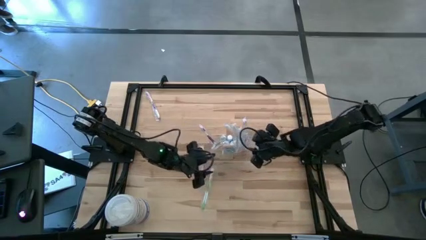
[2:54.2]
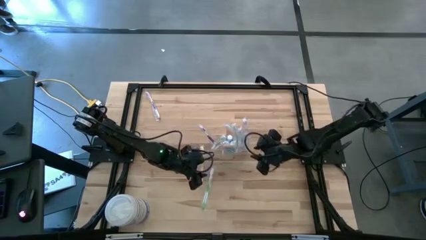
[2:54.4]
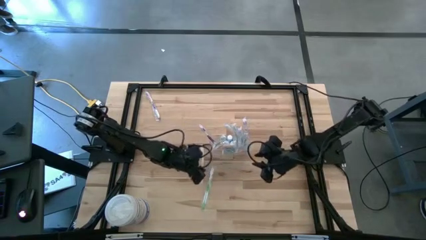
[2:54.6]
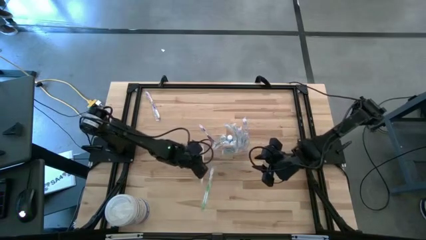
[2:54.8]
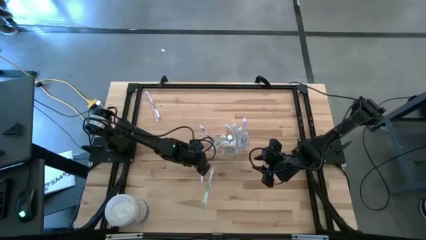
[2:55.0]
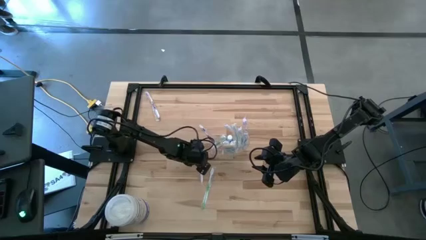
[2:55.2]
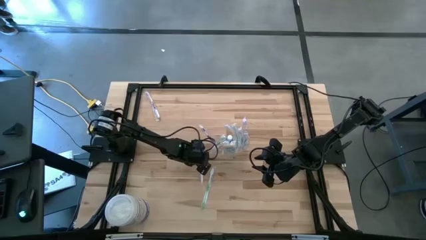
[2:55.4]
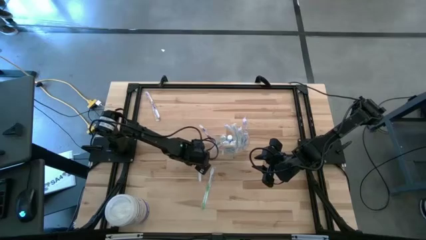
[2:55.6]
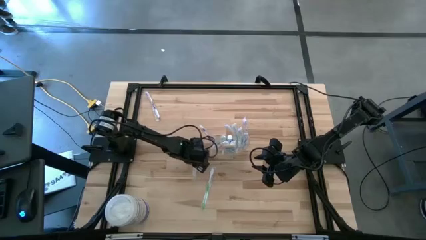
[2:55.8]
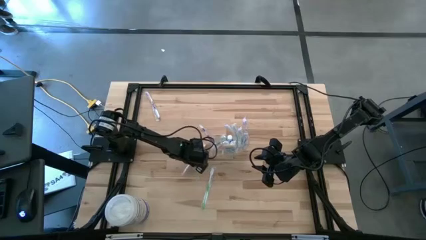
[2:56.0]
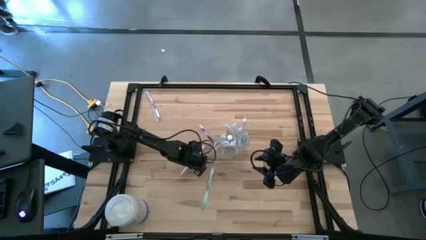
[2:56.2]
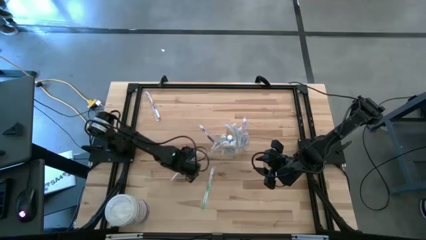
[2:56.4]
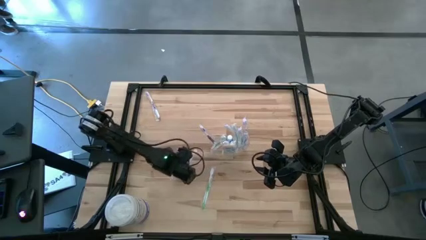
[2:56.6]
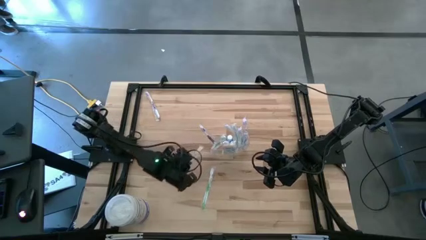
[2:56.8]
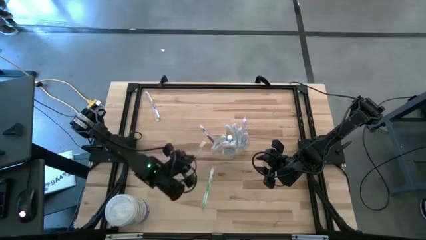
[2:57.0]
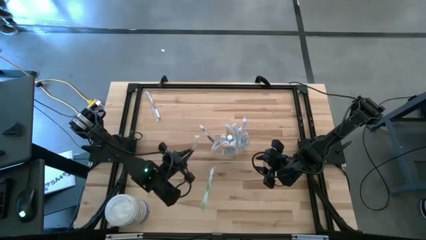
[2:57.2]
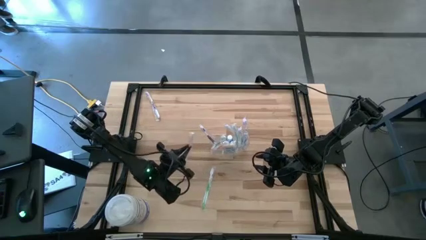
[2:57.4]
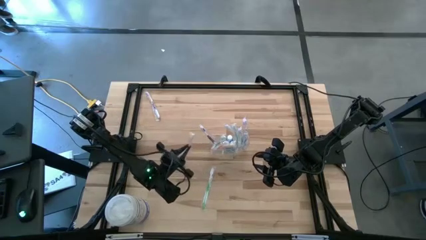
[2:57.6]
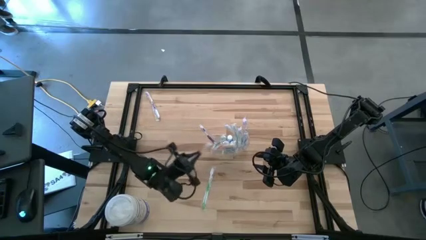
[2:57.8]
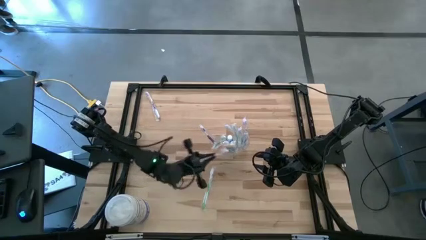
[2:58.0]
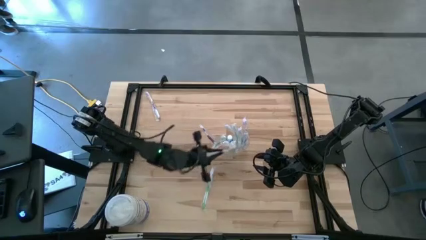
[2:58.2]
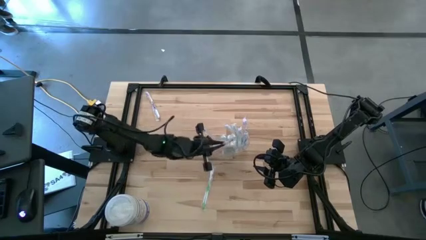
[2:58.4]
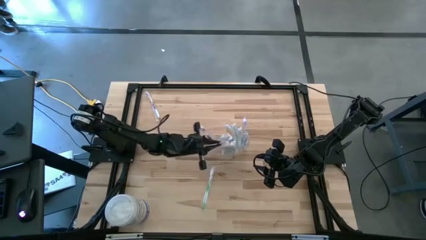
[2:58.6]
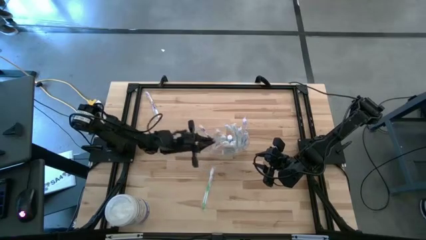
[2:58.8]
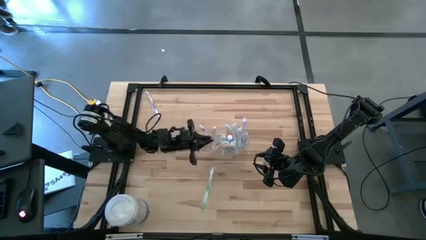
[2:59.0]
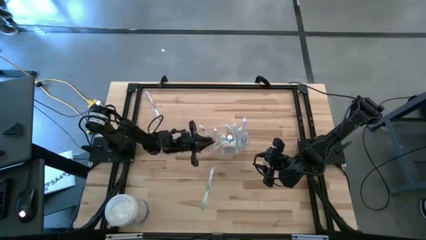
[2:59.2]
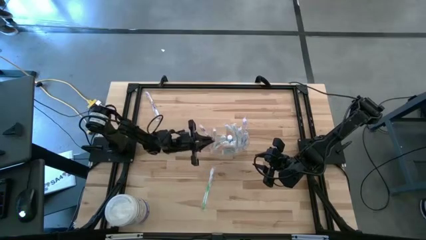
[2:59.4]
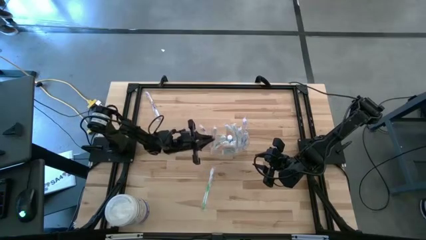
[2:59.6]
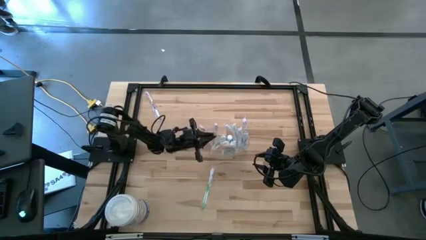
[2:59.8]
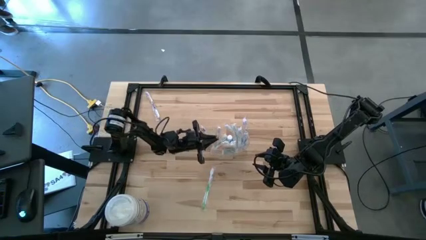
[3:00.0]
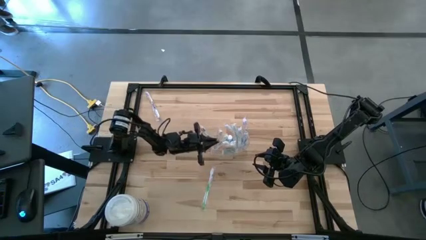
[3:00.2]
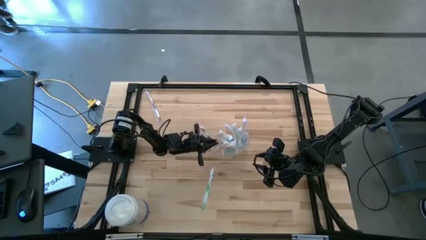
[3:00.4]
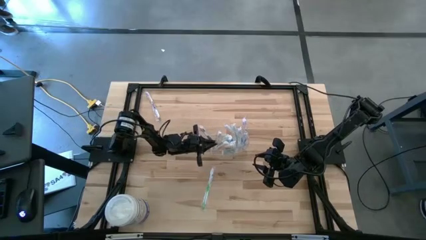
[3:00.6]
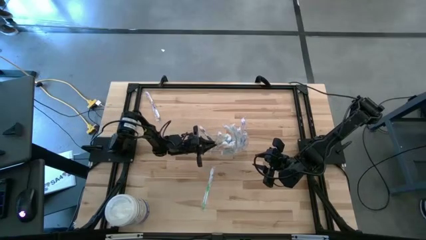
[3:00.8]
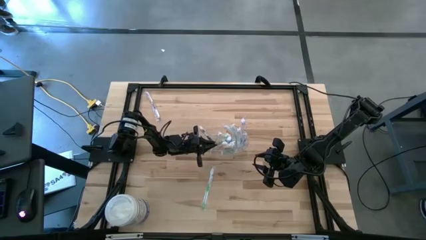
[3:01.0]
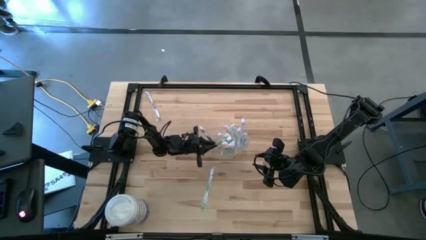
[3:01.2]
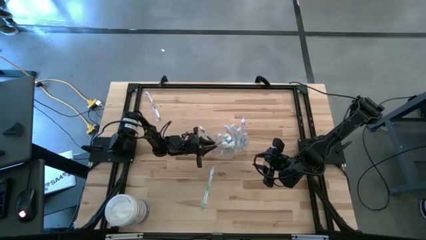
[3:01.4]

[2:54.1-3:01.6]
Task: Pick & Place toothbrushing station
Put the orange toothbrush into the wire organizer

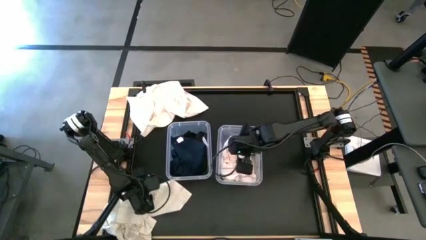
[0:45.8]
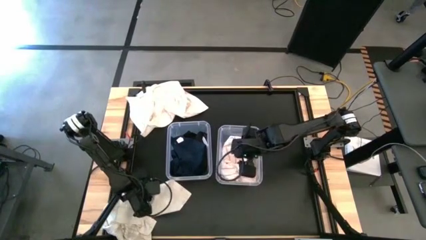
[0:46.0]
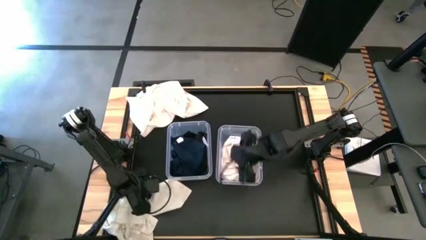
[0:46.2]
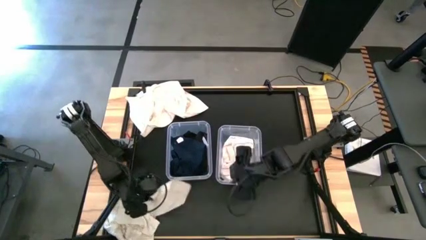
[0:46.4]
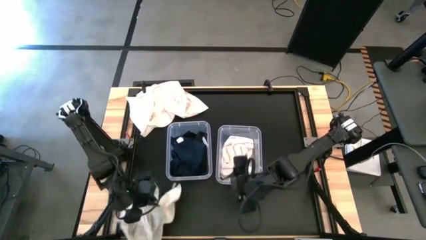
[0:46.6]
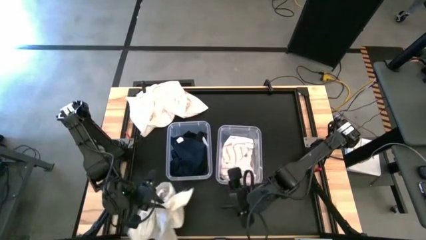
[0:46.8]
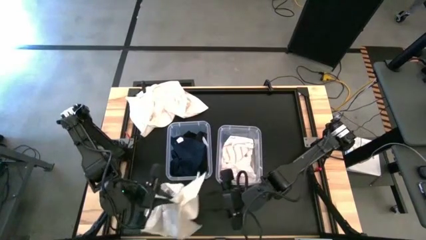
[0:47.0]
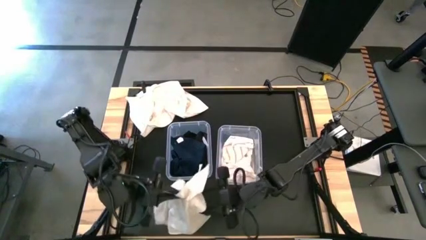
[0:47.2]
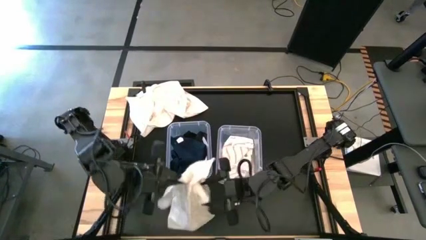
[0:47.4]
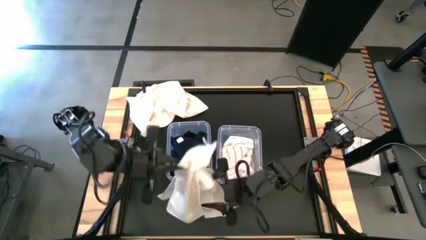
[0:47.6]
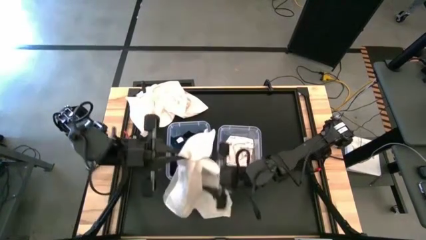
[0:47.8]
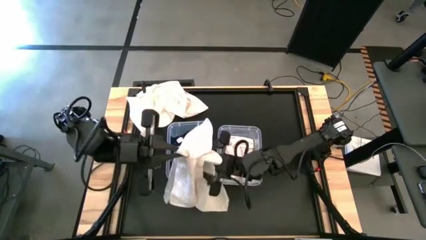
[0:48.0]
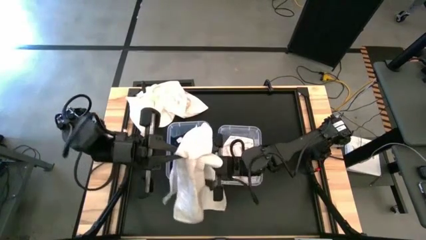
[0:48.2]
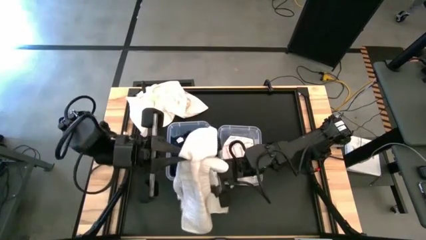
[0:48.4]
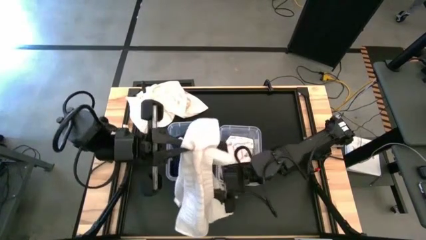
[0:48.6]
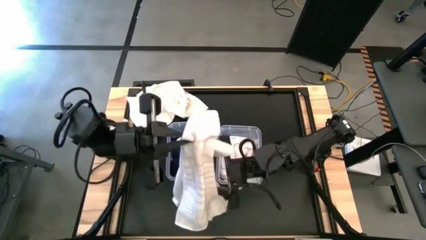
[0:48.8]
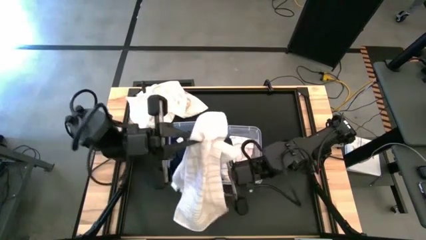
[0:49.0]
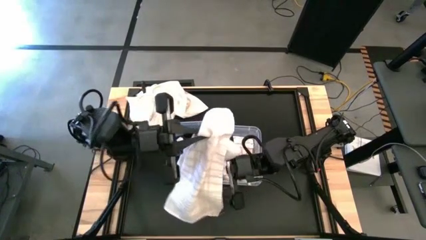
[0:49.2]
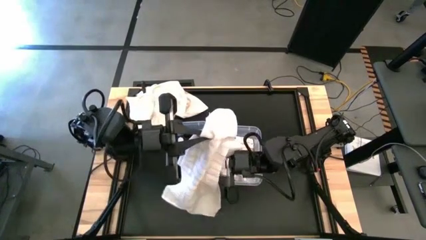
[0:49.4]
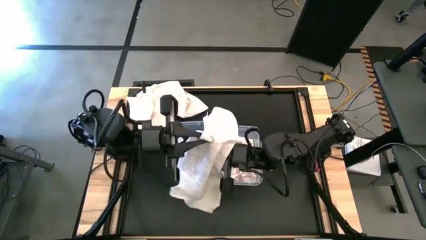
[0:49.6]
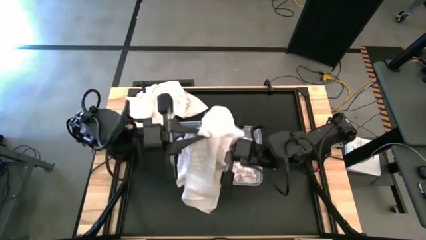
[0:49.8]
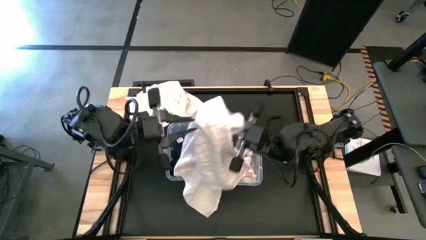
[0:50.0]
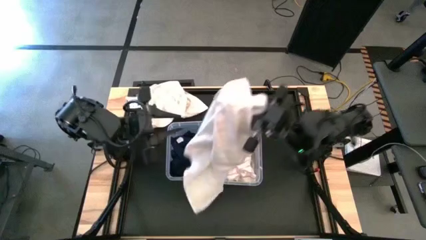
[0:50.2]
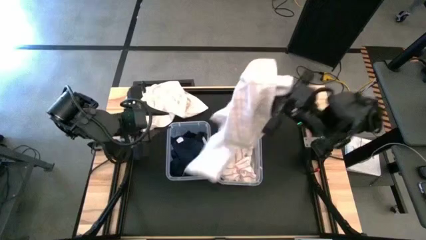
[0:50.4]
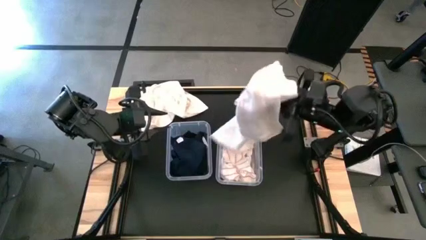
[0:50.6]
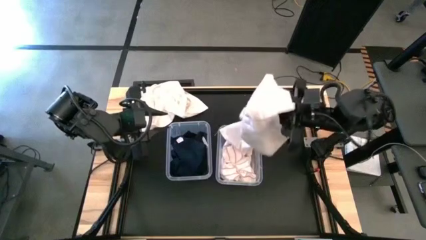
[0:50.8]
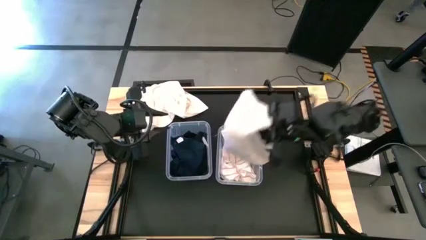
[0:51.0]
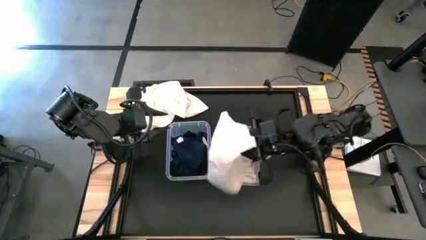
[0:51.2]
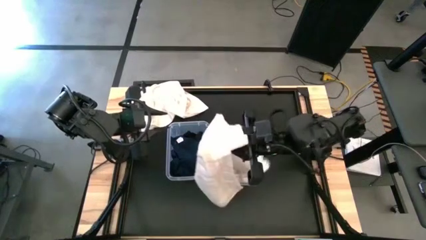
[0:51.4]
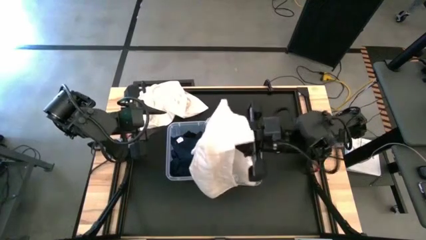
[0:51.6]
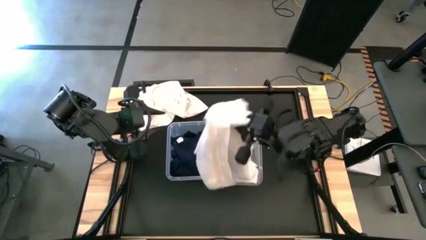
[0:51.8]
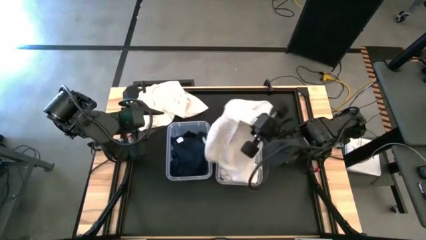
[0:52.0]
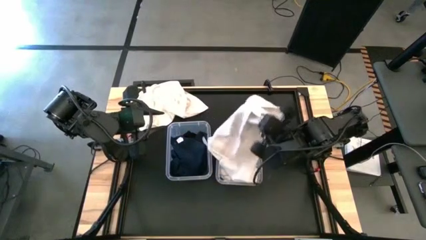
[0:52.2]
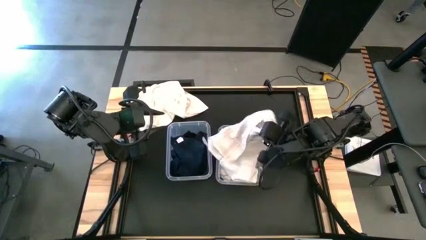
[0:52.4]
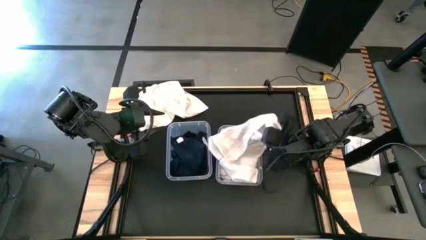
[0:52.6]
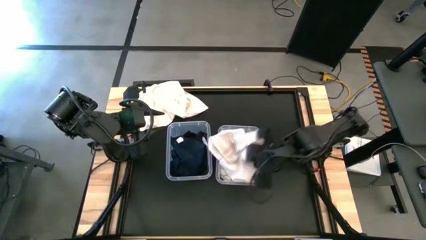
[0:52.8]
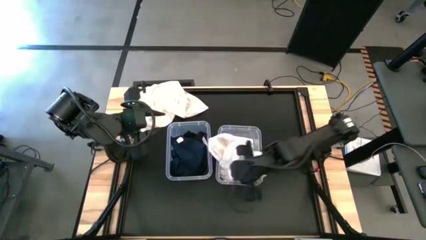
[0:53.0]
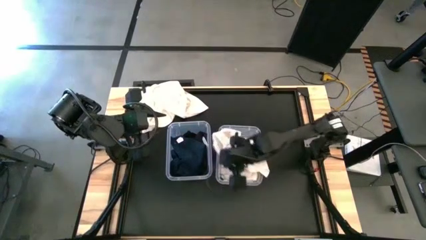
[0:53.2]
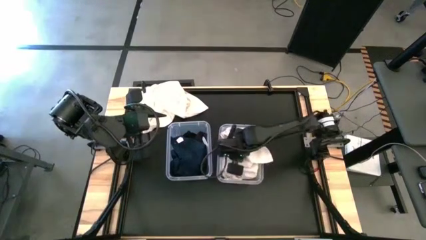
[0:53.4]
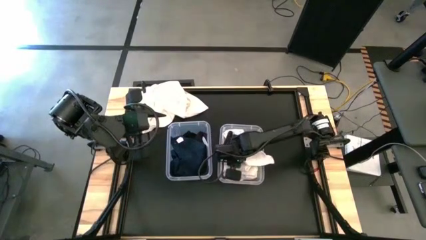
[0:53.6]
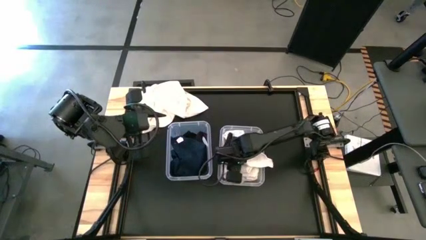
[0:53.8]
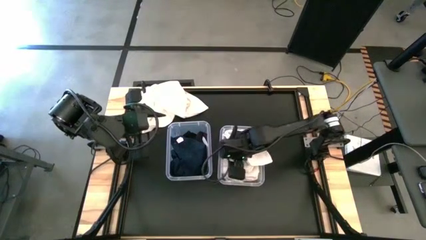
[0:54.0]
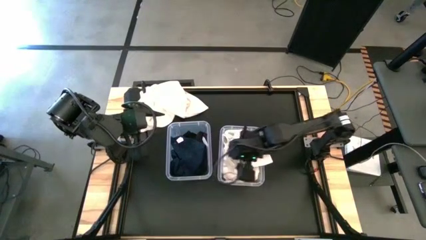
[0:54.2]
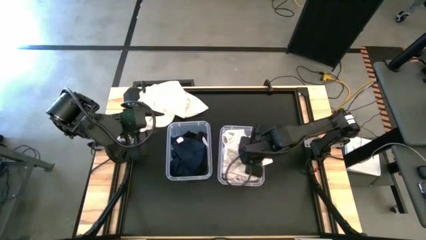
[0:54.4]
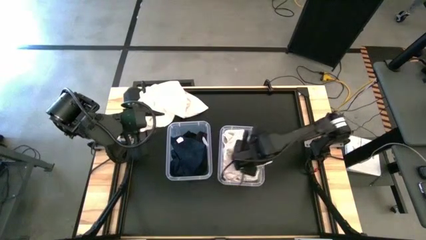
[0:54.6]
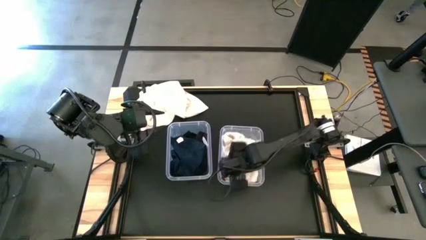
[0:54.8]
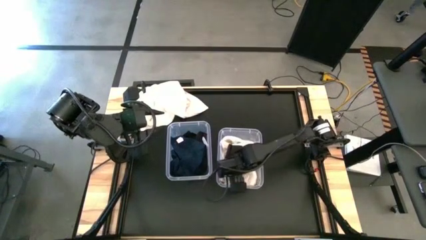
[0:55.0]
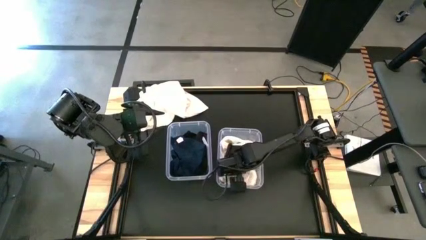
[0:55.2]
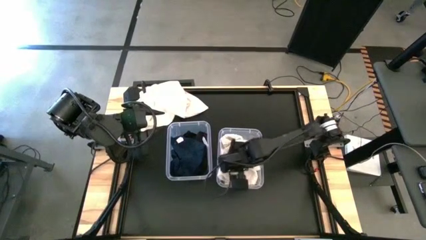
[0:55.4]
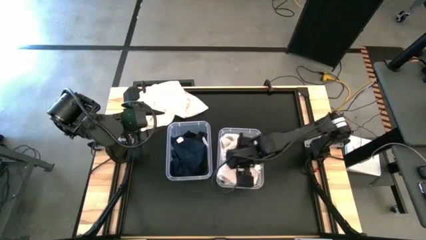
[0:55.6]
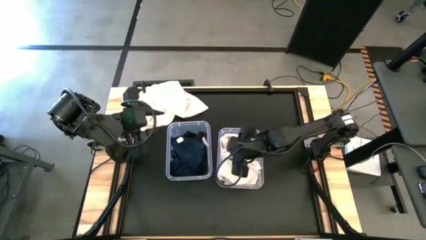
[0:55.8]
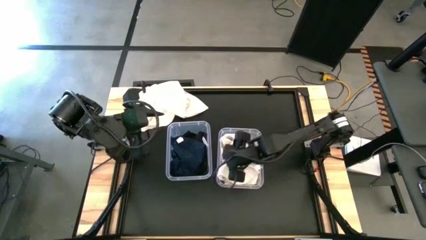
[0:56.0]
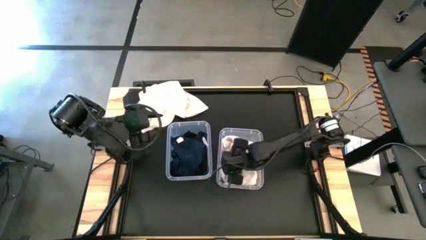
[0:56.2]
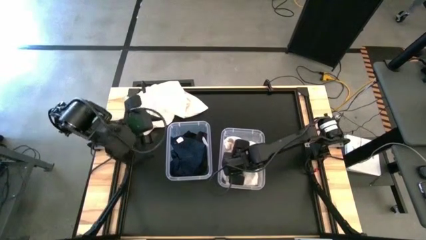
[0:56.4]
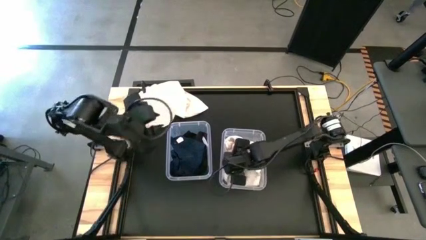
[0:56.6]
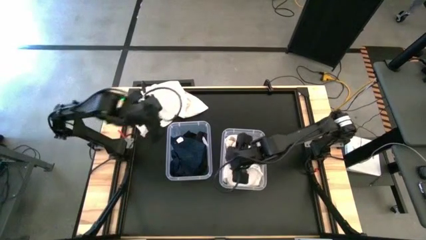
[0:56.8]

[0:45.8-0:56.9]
Task: Sort towels by color in basket
Put the bottom white towel into the right transparent bin
